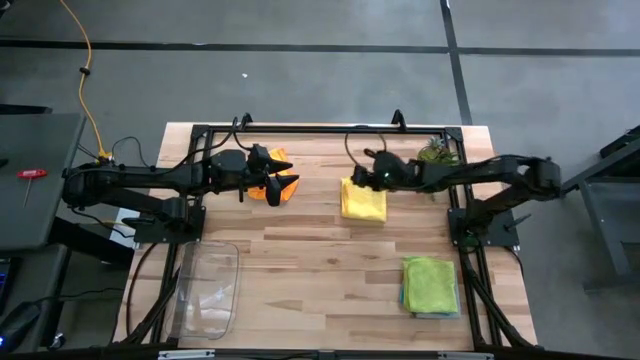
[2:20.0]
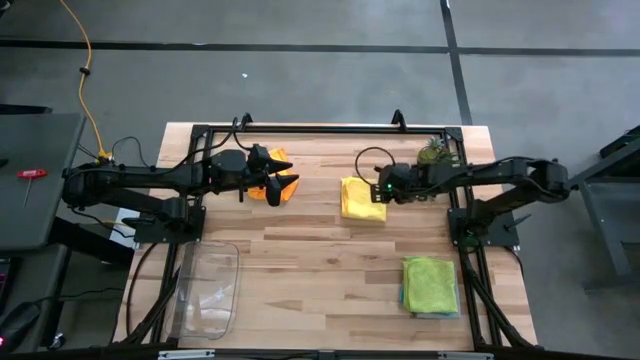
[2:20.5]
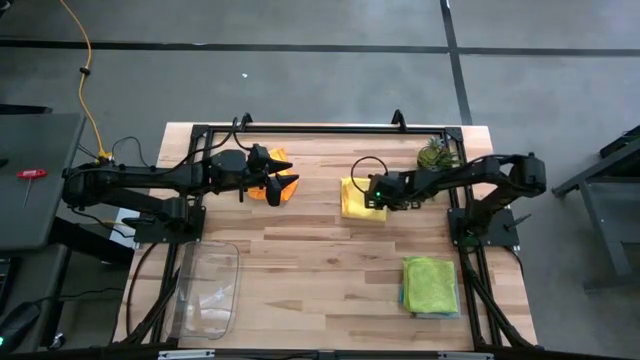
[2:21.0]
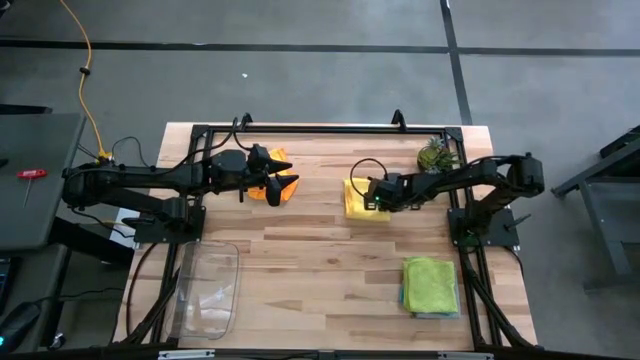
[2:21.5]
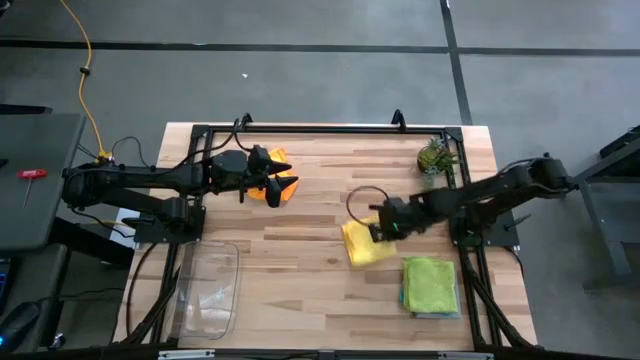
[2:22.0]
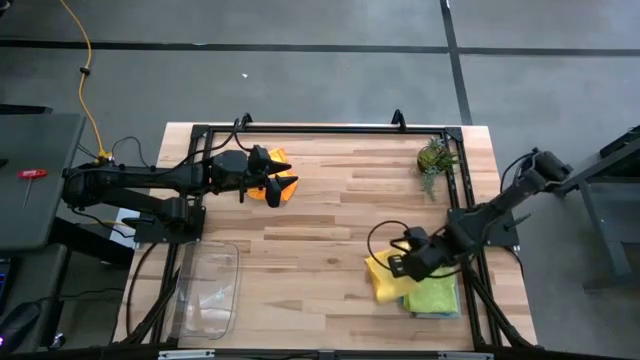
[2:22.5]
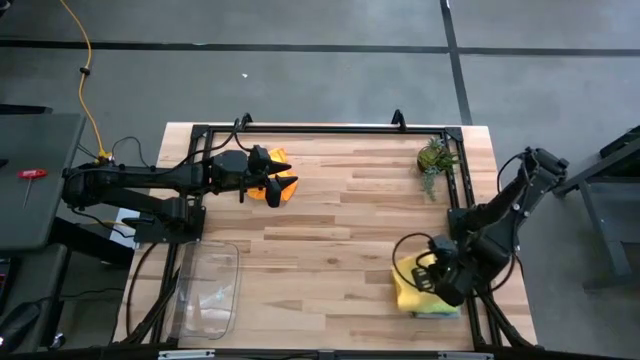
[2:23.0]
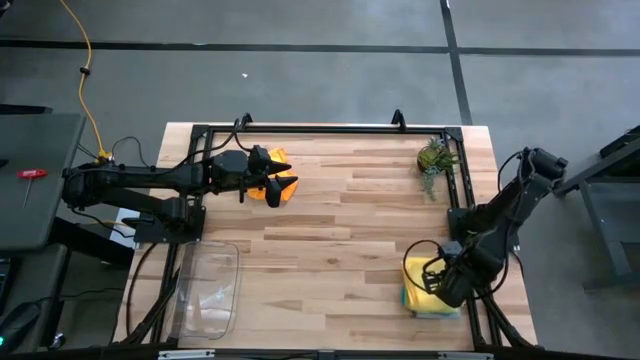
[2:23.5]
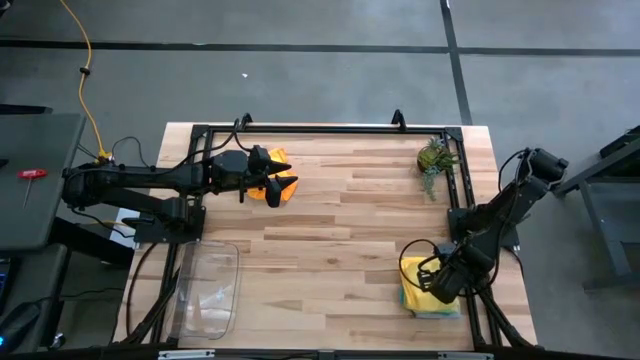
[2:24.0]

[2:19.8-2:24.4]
Task: Fold microfiber towels
Stack the yellow microfiber cloth on top of the green microfiber cloth

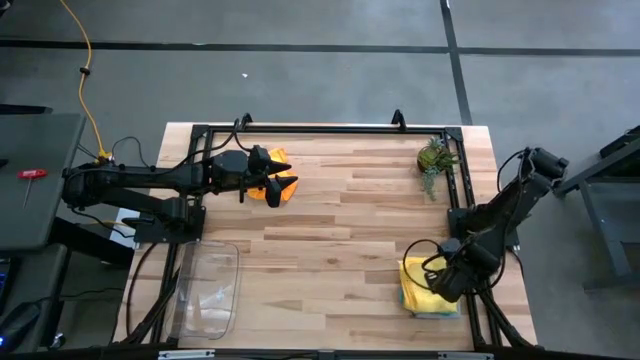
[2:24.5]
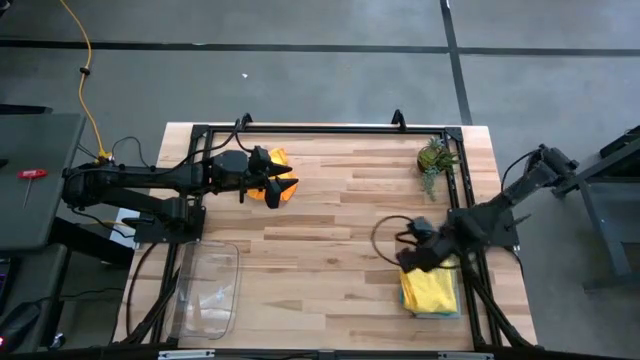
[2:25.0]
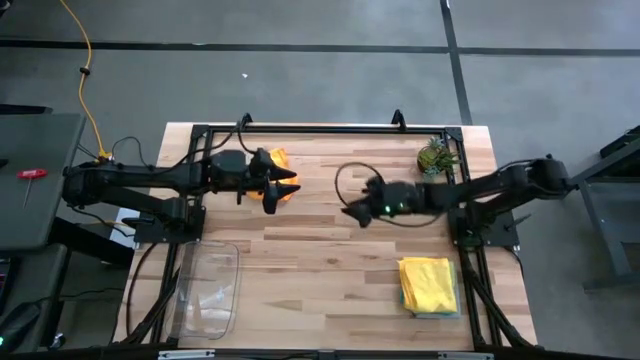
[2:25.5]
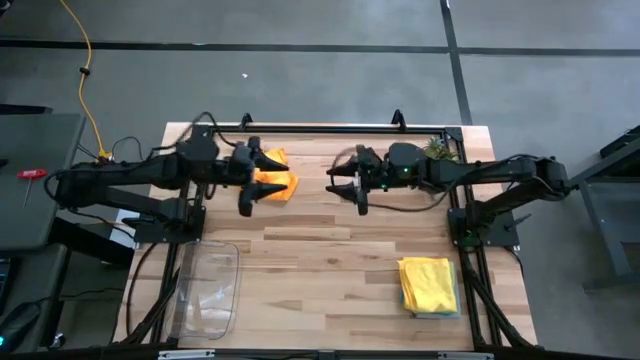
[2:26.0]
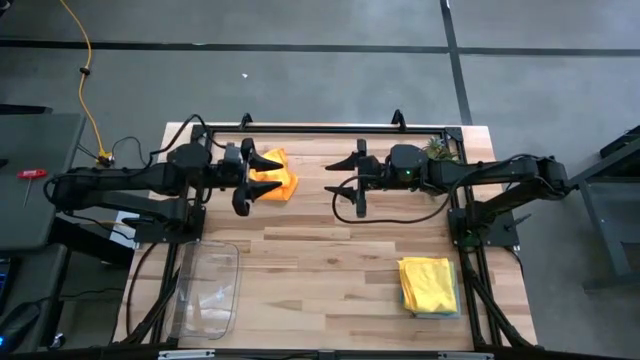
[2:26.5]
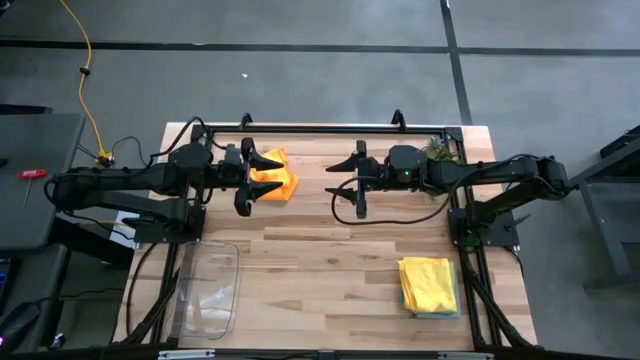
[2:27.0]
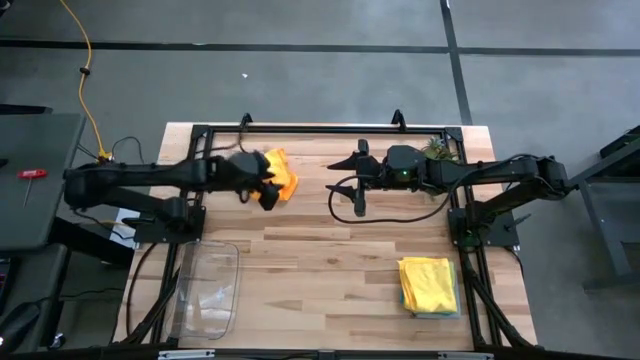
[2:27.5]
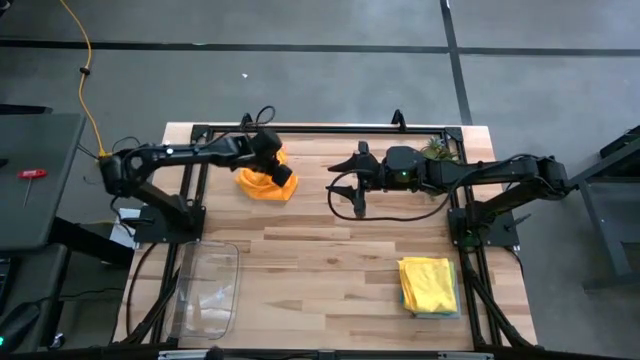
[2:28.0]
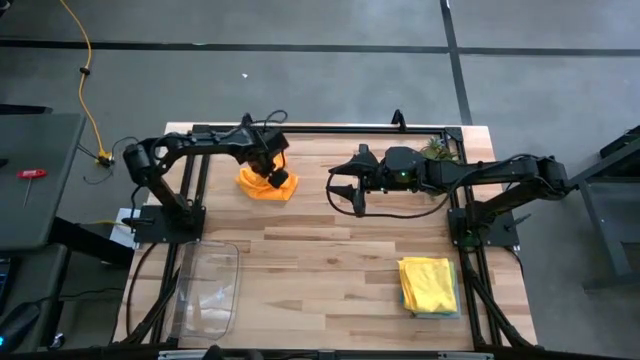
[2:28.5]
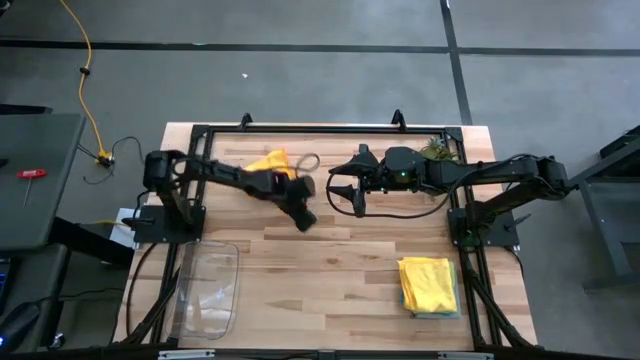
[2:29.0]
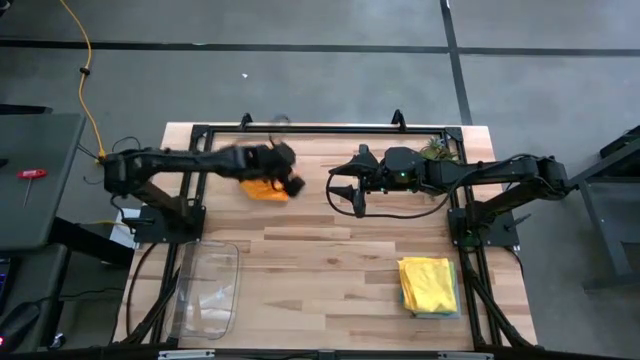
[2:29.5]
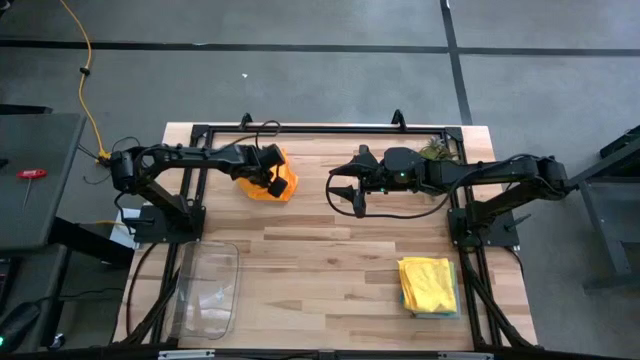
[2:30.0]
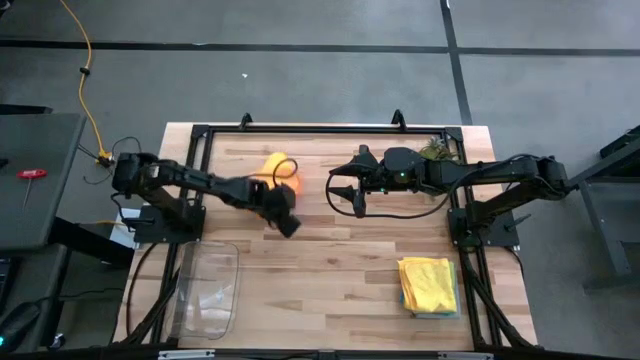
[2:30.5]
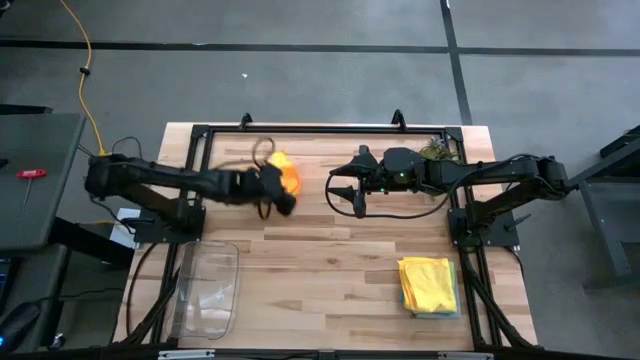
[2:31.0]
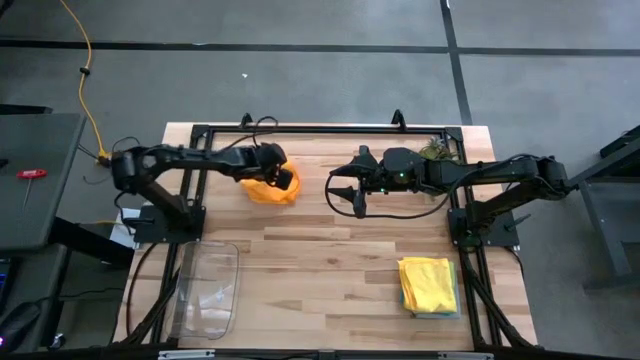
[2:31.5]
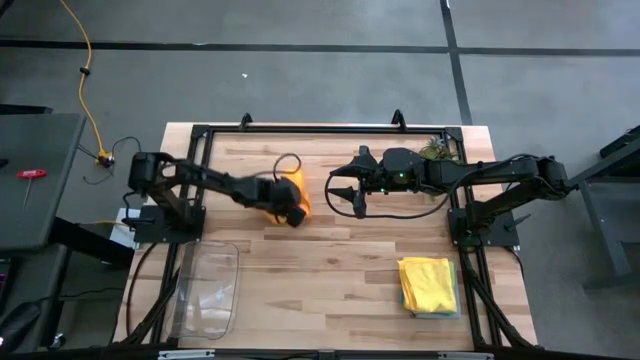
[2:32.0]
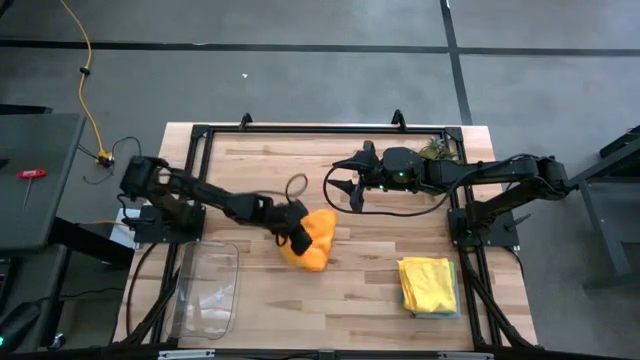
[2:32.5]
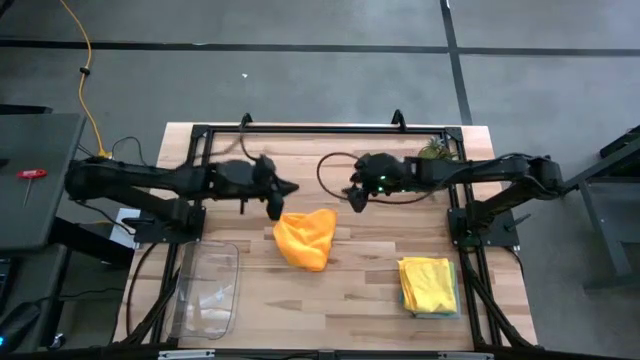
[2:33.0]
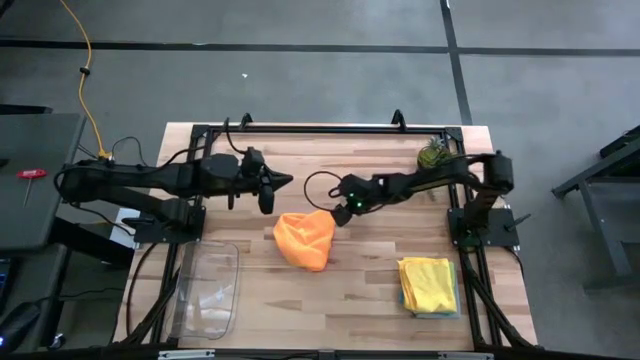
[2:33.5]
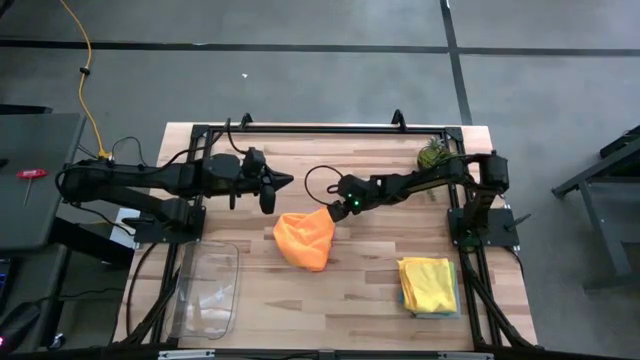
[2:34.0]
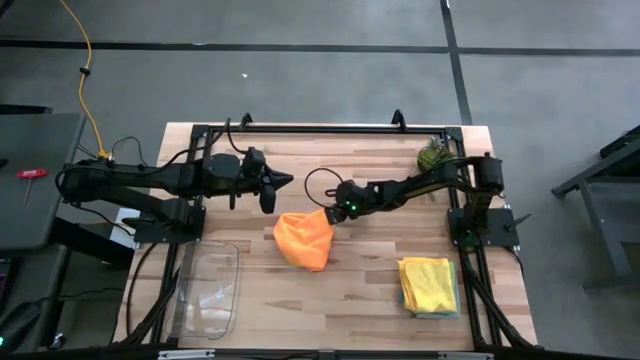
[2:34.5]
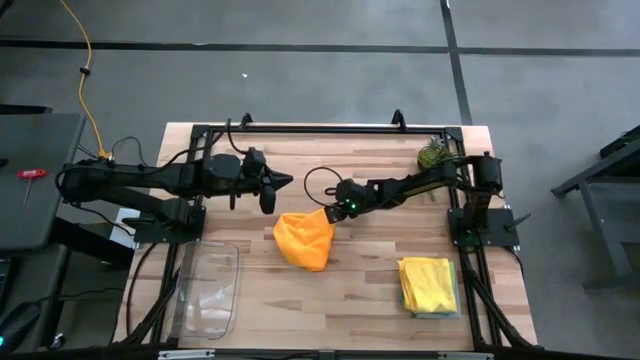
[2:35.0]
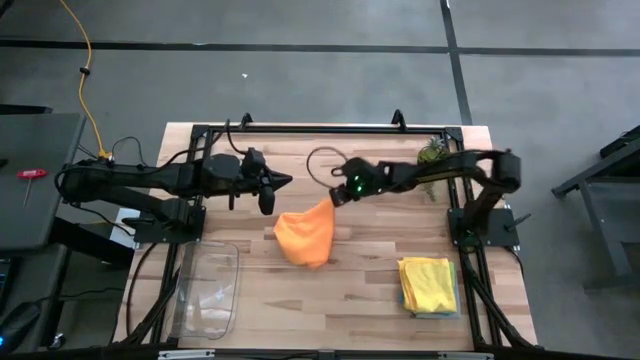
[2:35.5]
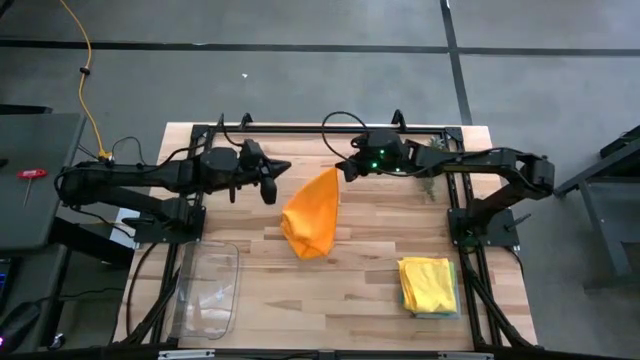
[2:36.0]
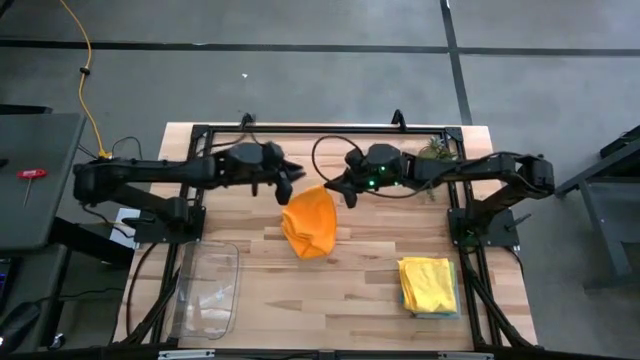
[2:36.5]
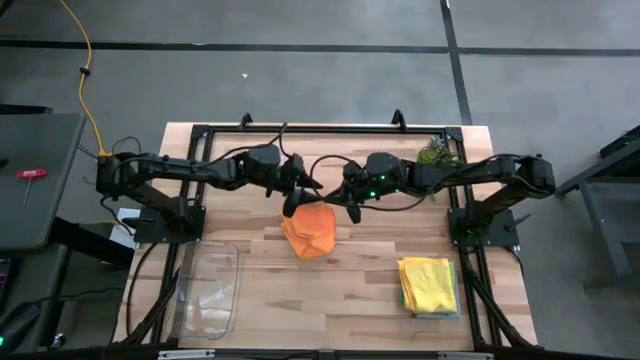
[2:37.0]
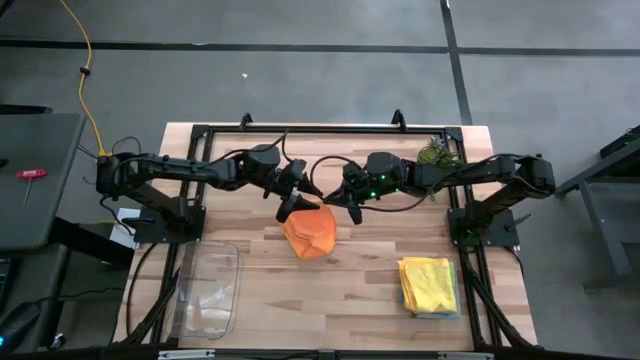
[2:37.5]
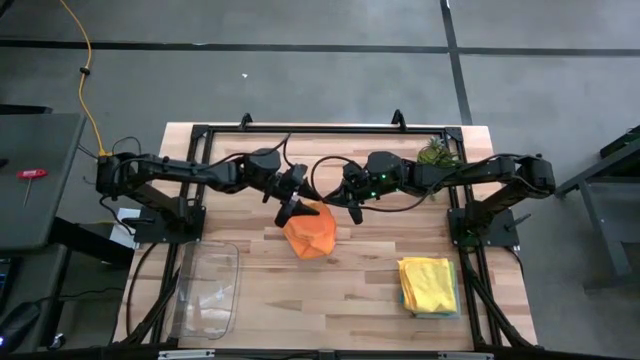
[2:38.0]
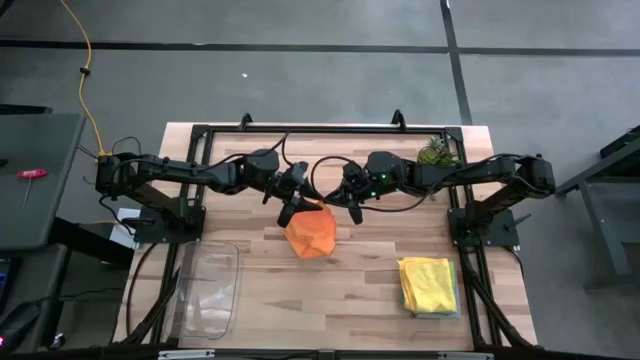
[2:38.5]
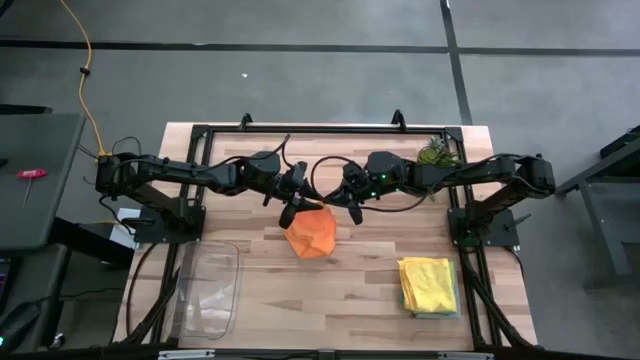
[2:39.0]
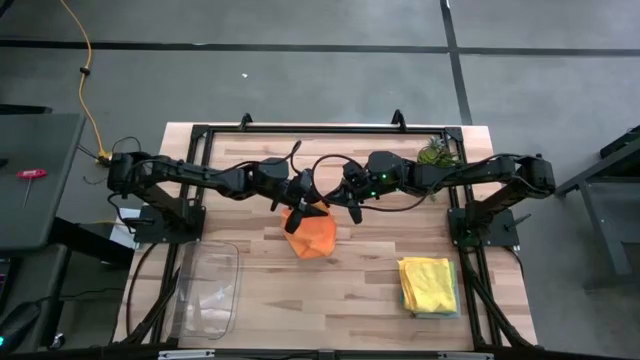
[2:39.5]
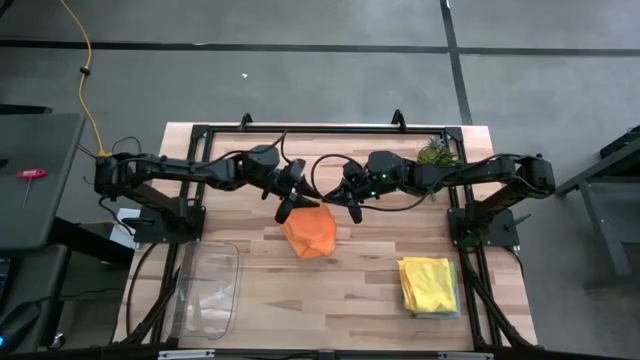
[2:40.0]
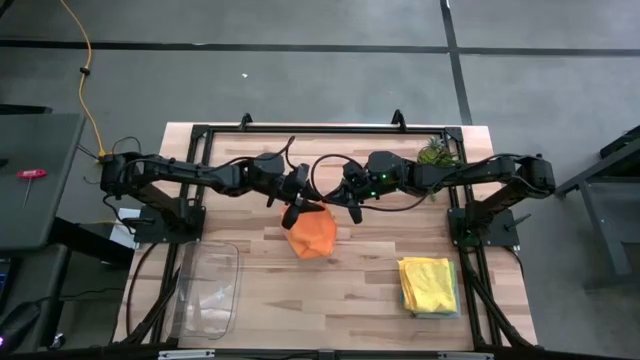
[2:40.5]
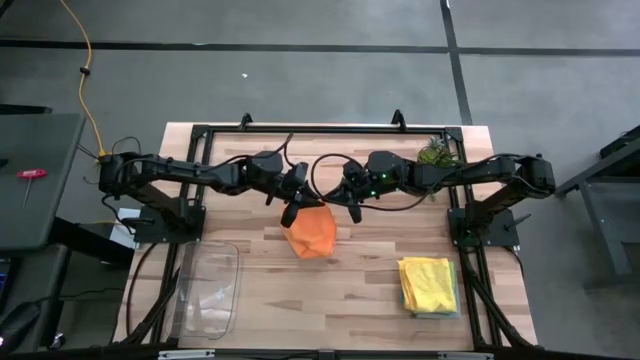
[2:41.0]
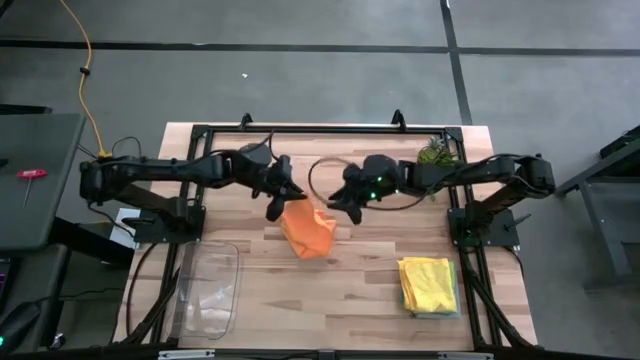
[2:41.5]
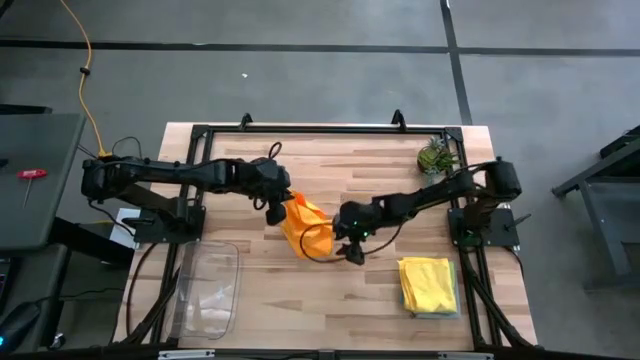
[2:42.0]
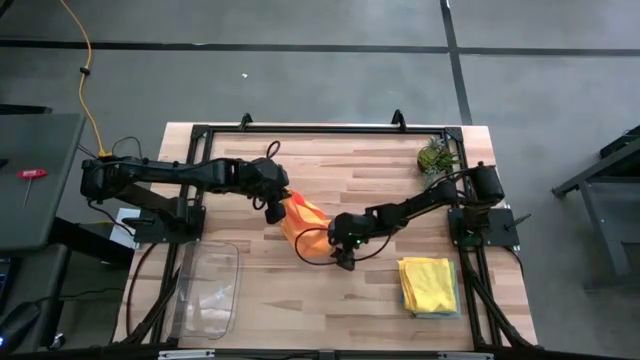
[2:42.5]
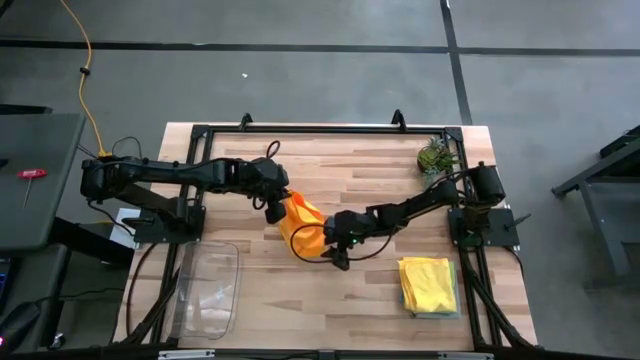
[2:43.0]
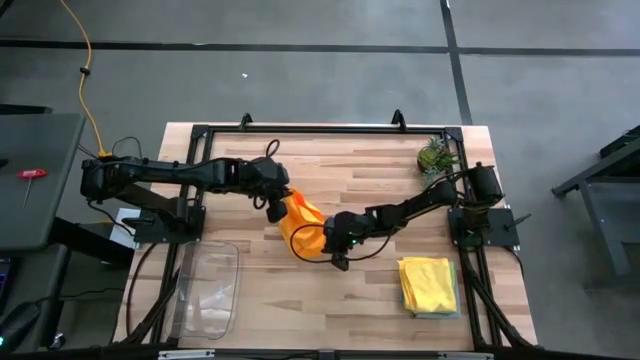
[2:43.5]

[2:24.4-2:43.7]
Fold the orange microfiber cloth
